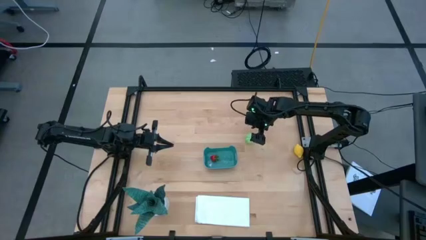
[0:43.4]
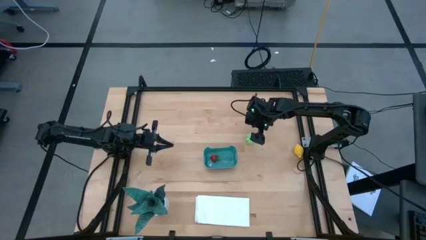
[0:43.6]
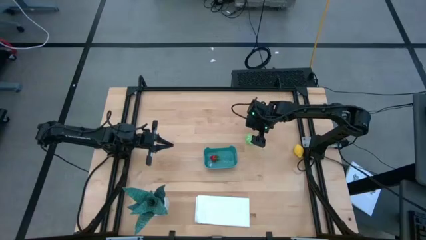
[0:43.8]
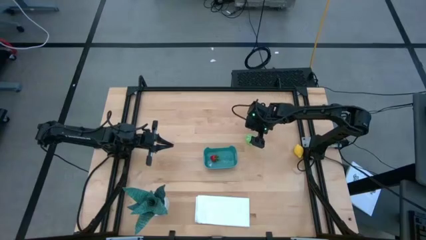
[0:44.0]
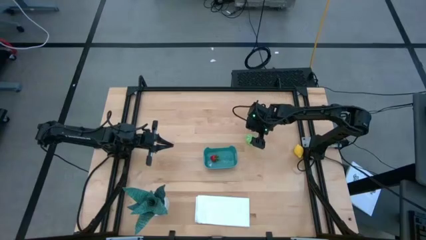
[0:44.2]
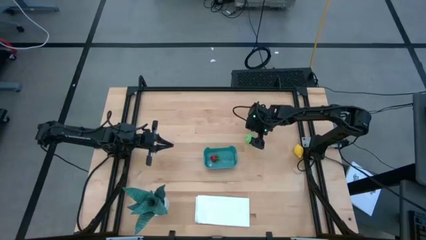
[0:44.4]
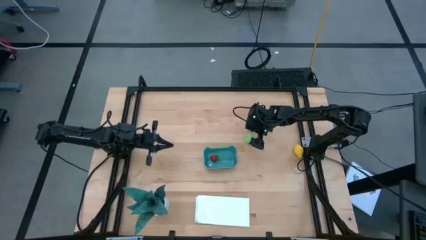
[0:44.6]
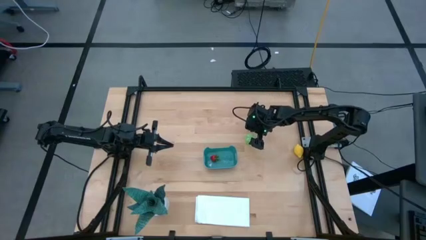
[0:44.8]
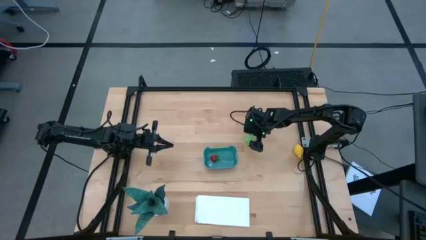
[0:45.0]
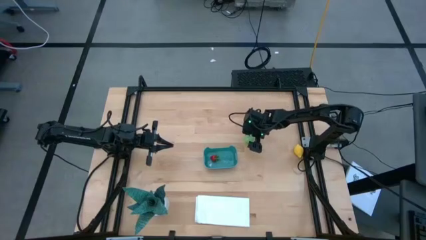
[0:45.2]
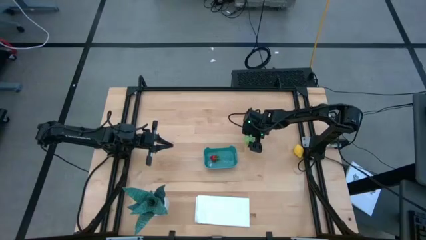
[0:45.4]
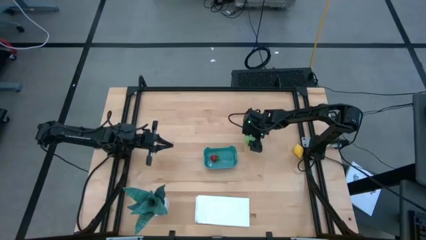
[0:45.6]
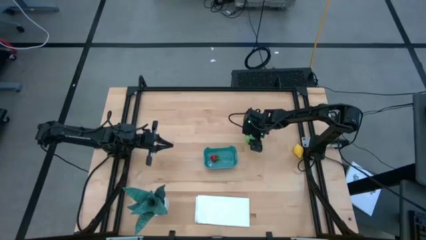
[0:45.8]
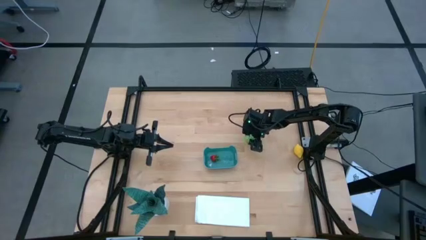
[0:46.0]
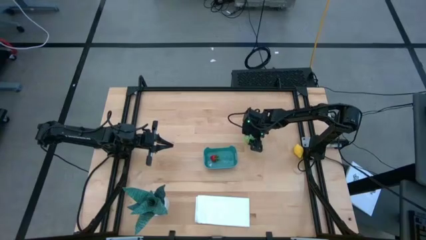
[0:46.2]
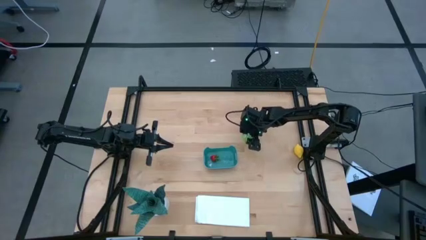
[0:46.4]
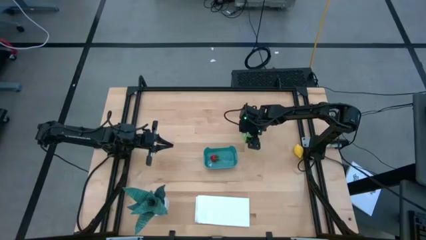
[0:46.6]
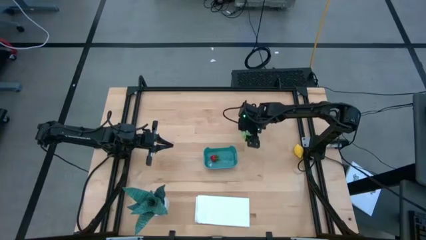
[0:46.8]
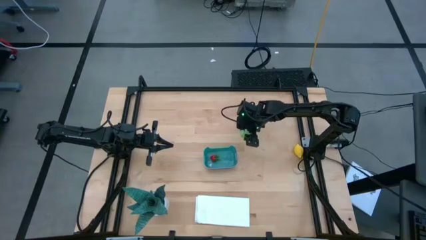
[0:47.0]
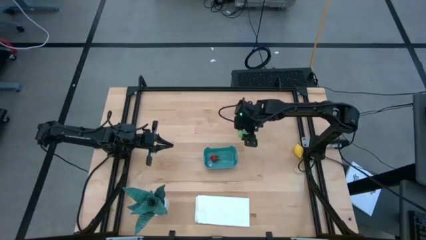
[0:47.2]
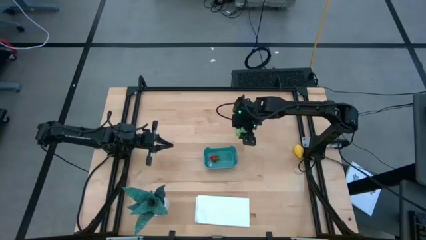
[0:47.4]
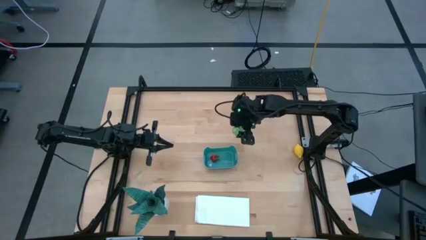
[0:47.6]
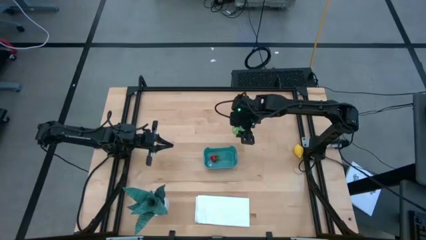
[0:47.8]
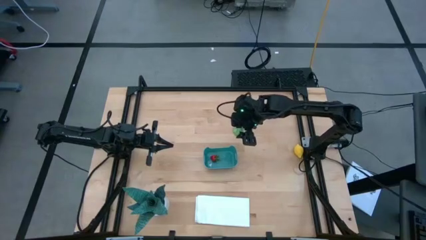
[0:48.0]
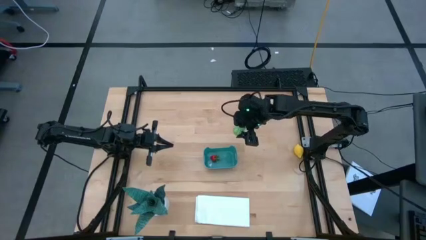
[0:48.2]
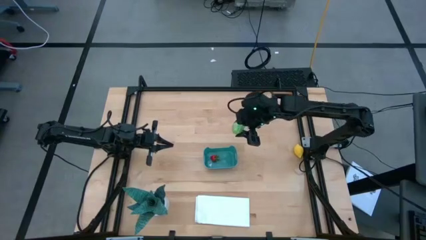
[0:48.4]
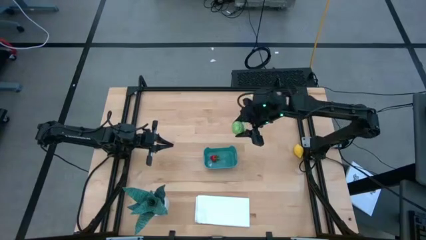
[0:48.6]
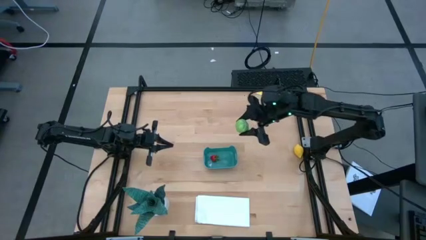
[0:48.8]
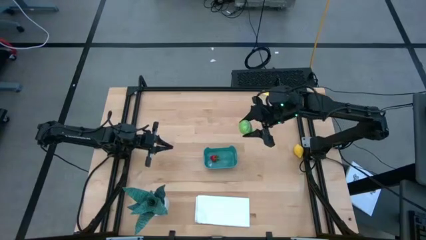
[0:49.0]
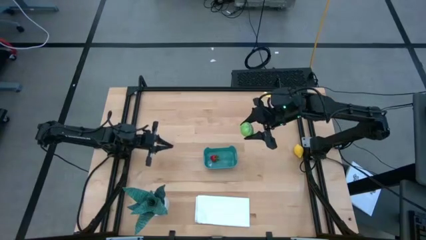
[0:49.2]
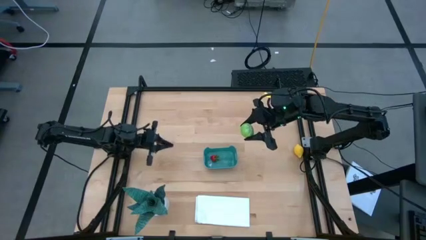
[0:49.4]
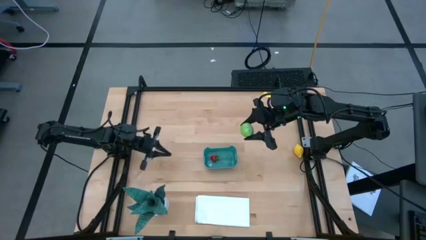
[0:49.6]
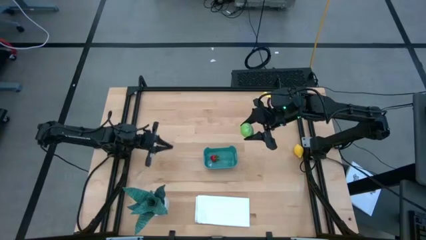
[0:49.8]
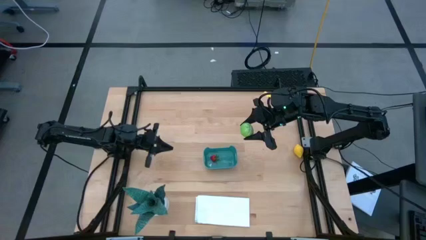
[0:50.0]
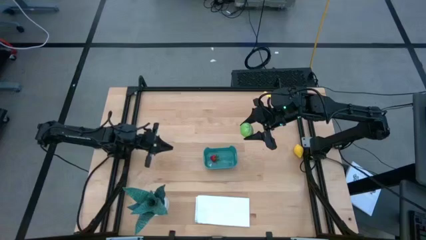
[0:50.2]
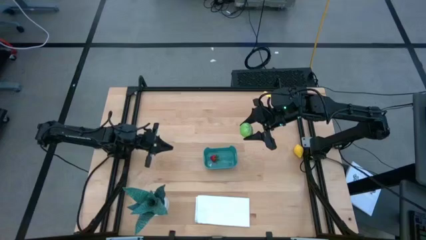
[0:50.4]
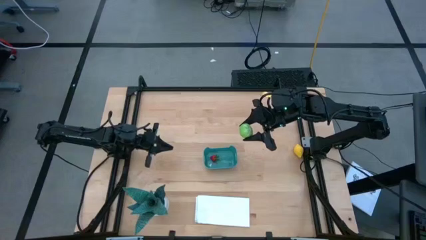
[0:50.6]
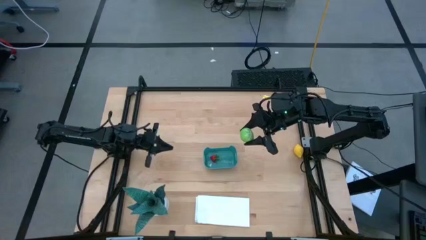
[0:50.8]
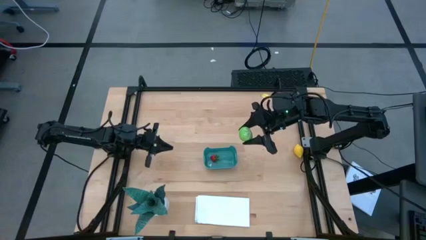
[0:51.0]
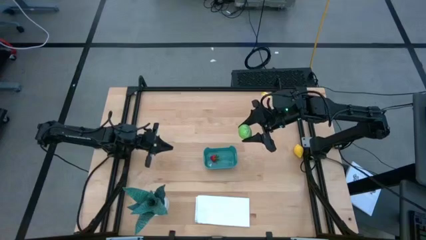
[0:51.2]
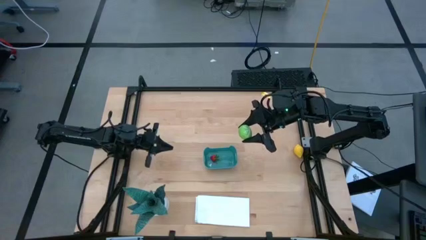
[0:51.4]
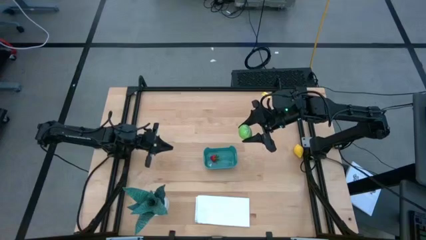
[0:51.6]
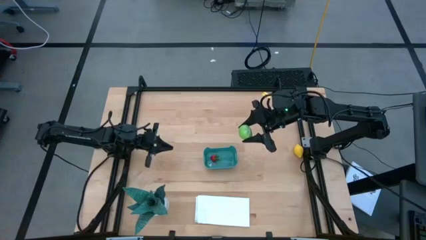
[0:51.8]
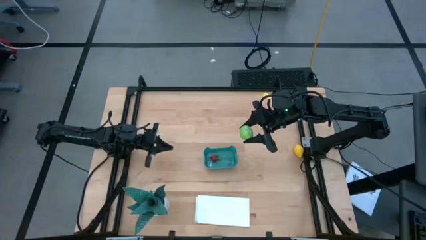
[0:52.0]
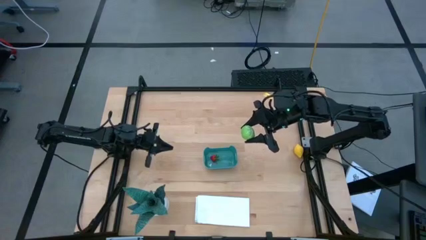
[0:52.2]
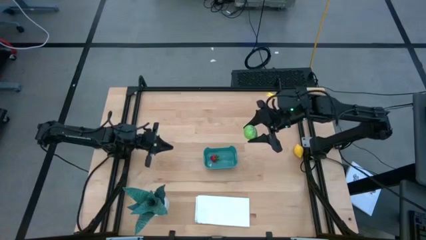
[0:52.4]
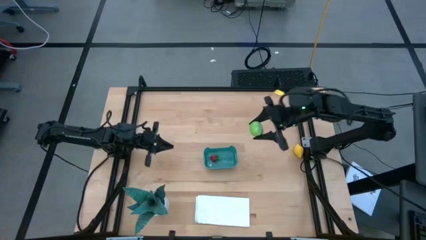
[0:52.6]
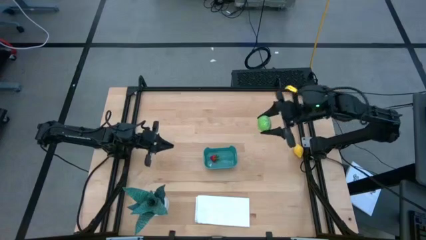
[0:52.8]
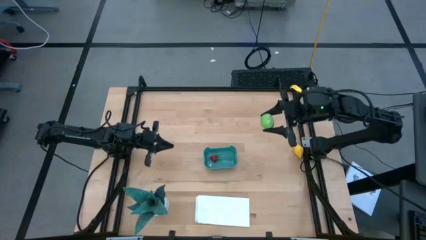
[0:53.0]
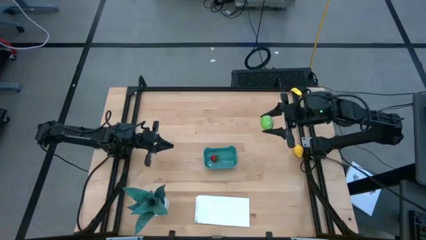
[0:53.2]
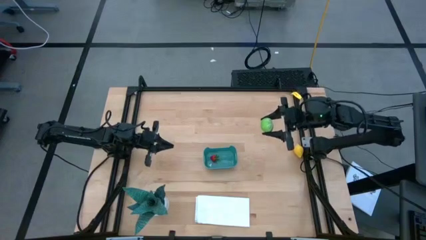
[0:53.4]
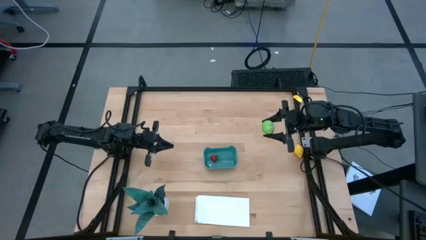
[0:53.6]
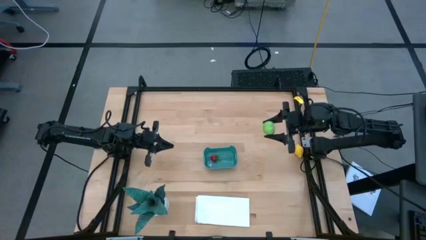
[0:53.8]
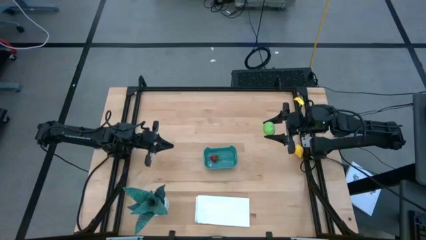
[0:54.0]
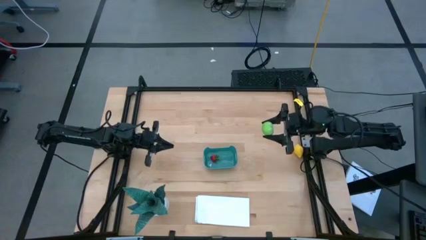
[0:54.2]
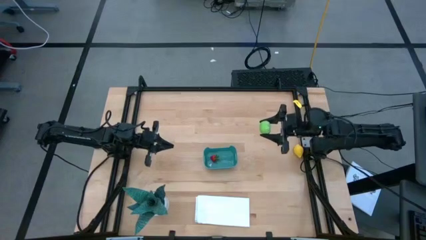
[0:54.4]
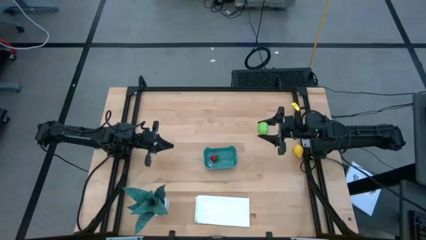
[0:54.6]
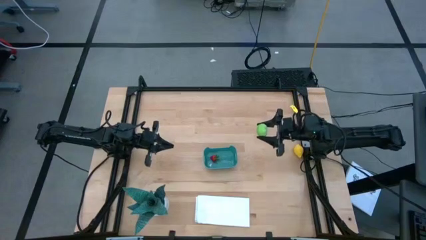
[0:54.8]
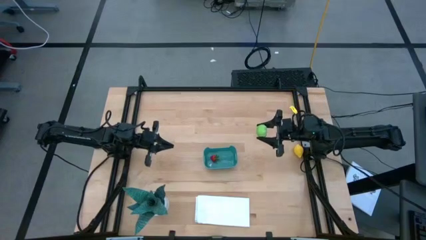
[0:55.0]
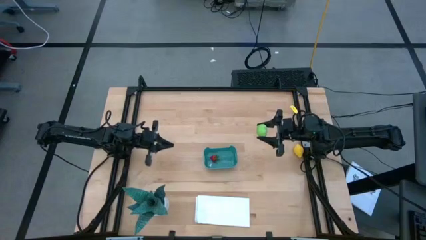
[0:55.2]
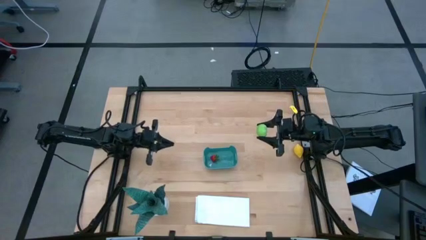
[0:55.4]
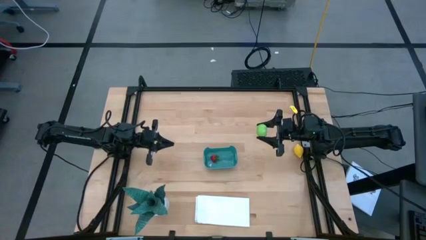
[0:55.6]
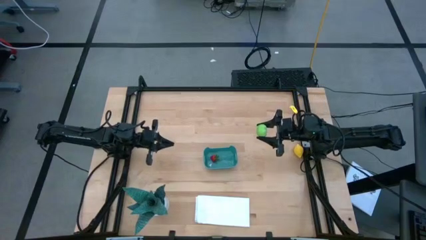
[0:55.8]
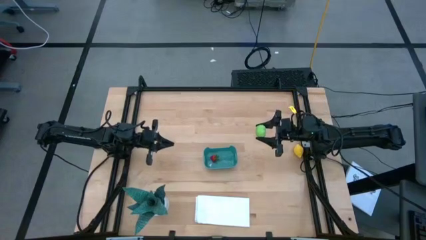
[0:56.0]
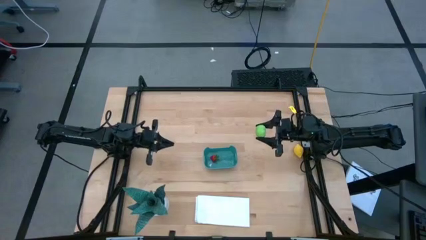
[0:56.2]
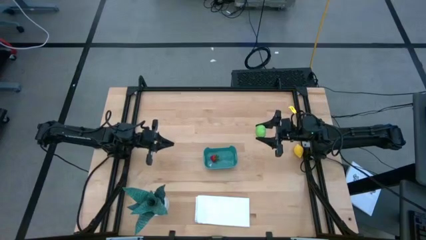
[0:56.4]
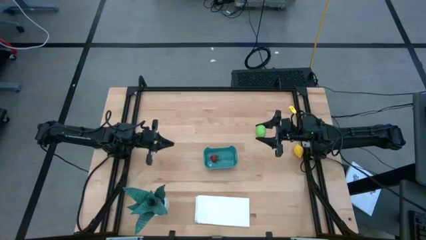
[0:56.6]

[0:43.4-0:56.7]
Task: Pick and placing Produce into tupperware
Put the green cabbage into the blue bin

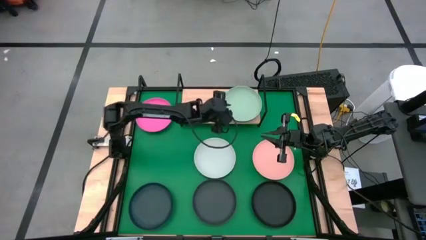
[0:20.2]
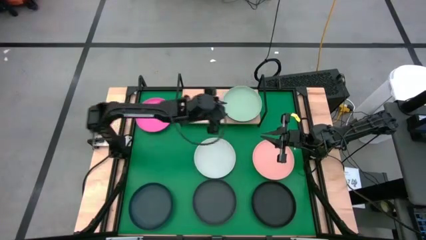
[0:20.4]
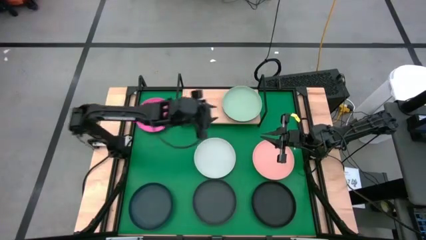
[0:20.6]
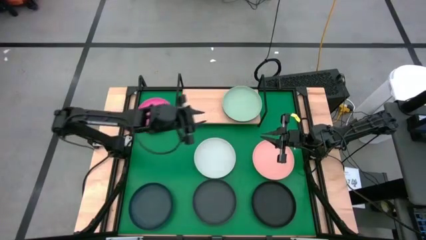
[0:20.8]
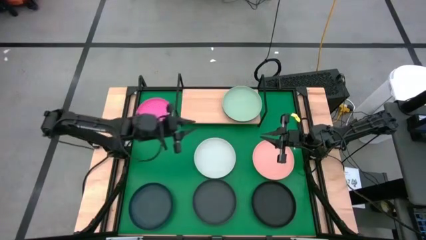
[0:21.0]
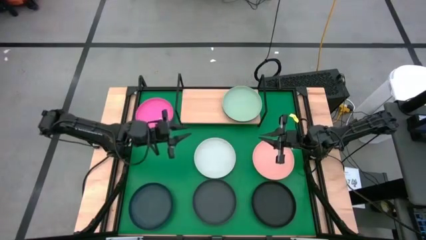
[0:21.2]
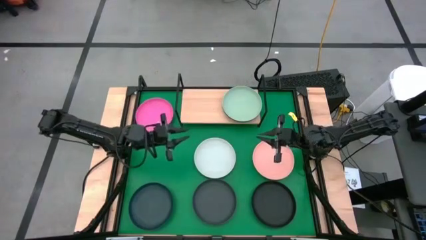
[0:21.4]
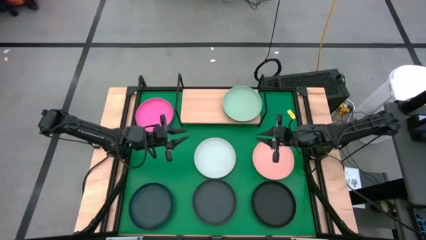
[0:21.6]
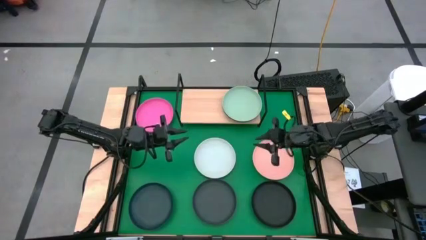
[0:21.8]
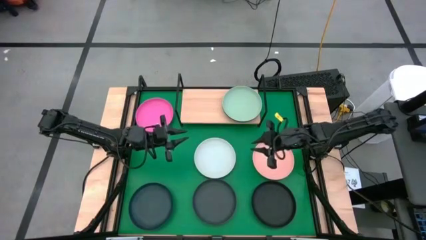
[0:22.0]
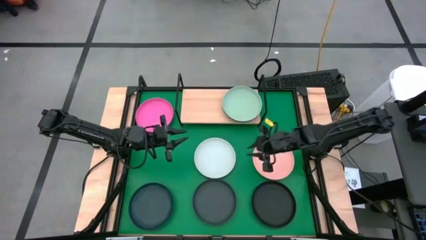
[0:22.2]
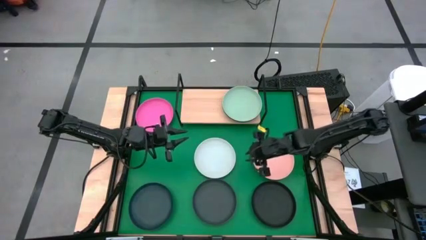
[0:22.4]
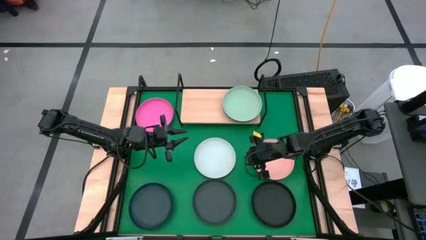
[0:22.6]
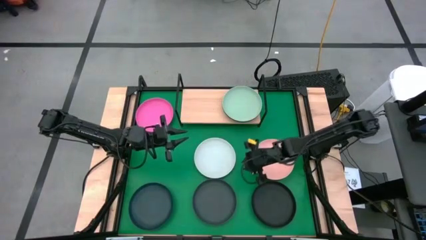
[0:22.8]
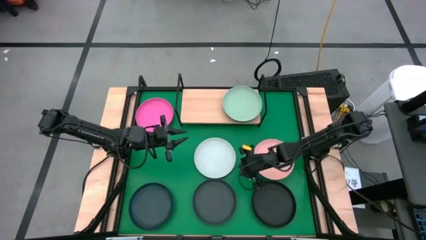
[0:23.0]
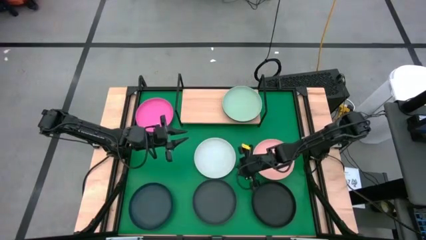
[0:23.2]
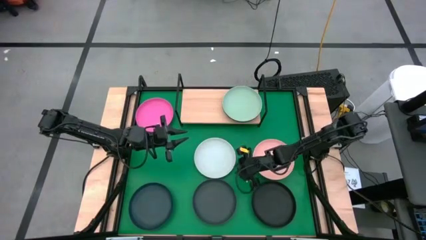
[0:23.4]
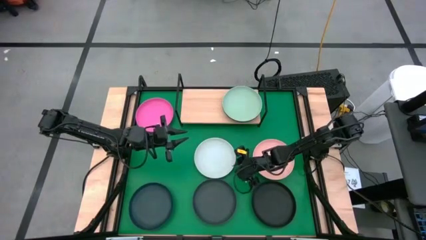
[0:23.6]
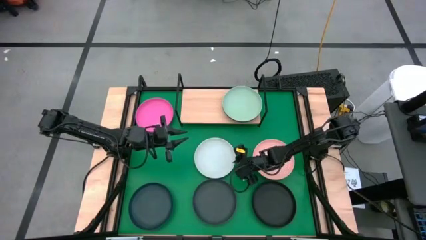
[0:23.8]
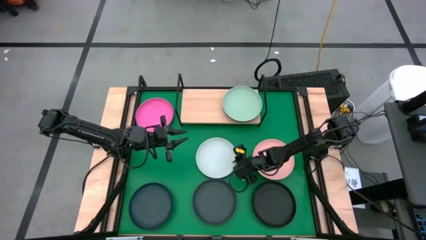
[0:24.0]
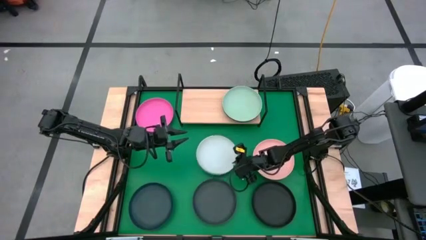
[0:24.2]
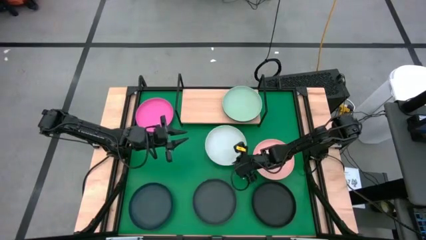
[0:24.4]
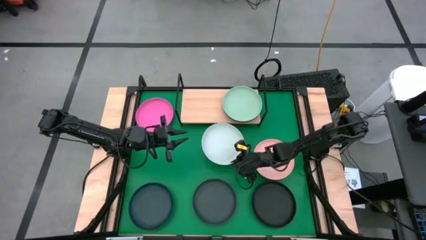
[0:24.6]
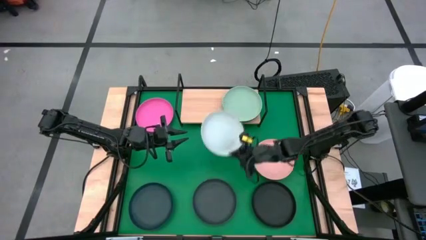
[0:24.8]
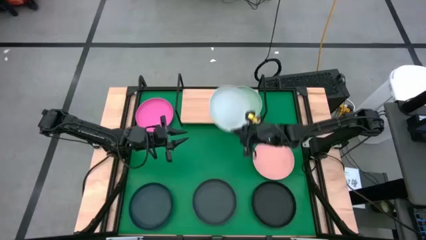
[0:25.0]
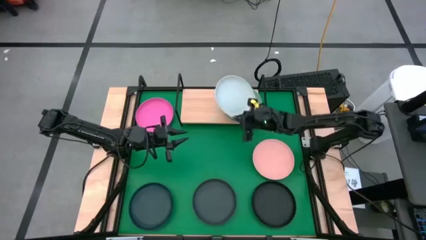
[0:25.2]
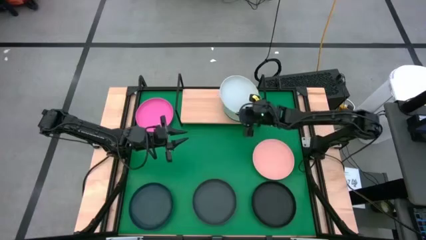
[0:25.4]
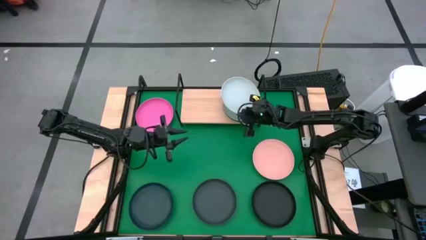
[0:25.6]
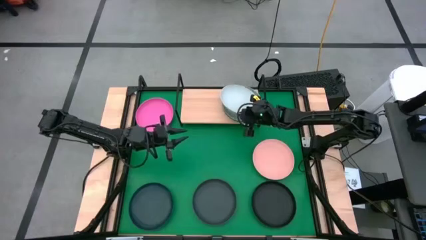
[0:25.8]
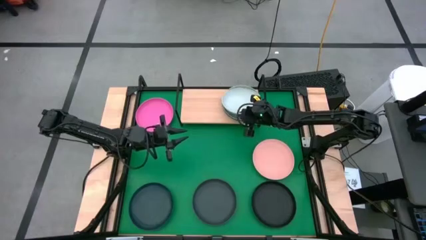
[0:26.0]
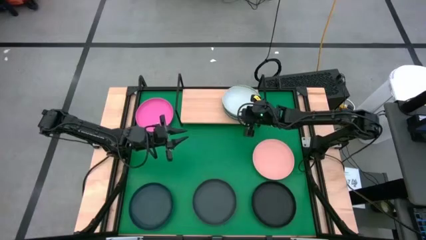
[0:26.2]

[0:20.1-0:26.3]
Task: Place and stack plates onto a shelf
Stack the gray plate on top of the green plate on the shelf
